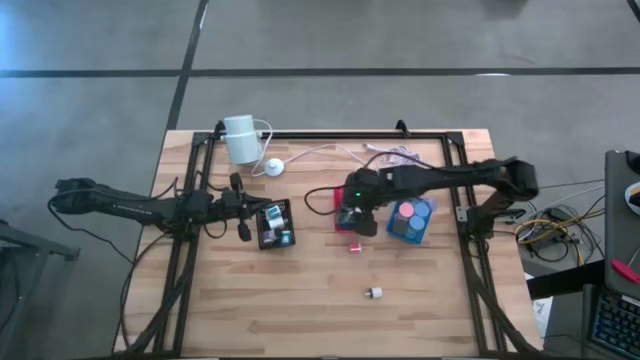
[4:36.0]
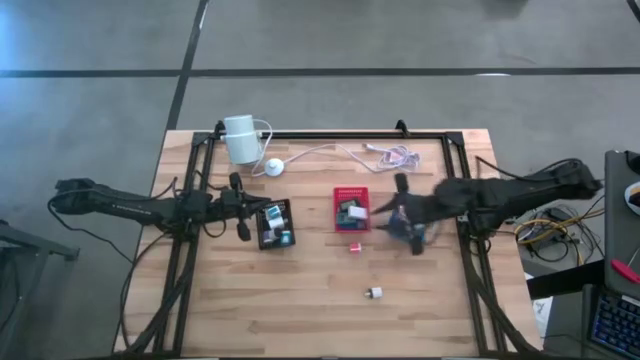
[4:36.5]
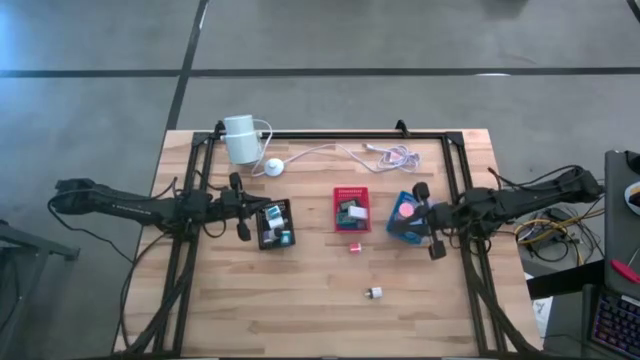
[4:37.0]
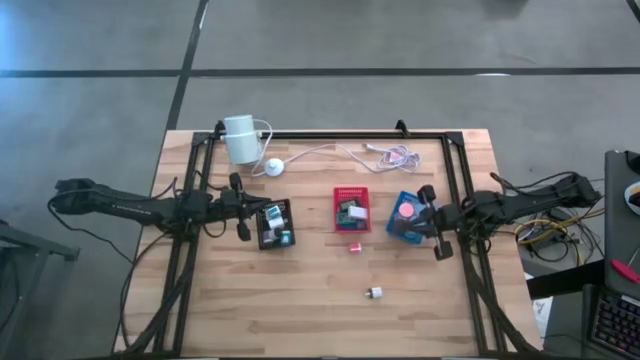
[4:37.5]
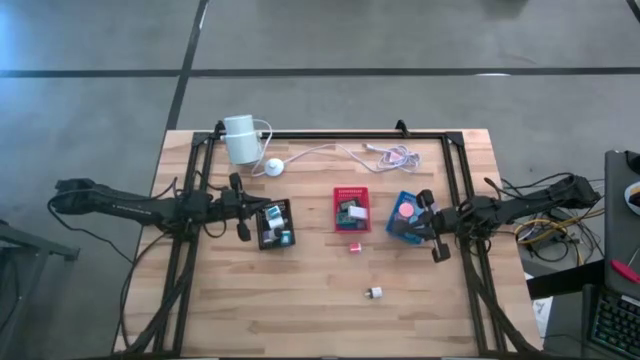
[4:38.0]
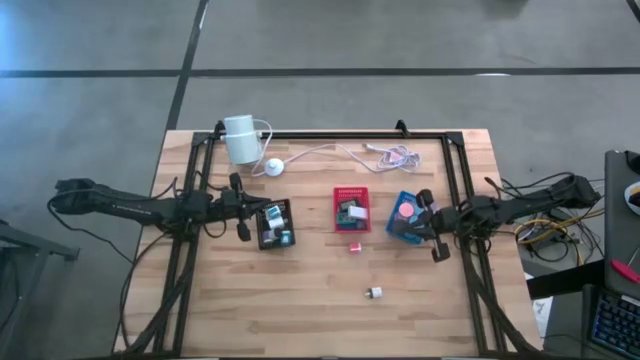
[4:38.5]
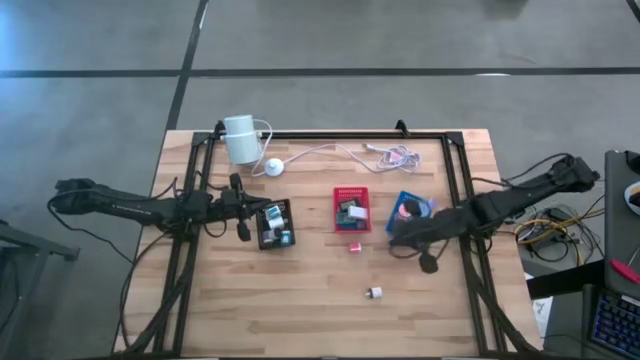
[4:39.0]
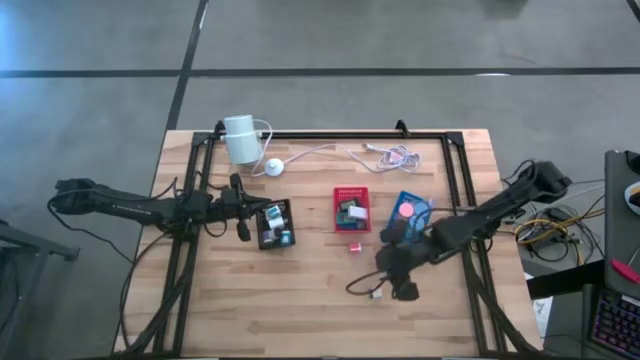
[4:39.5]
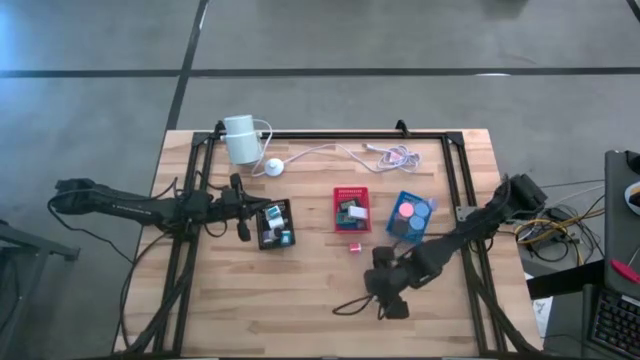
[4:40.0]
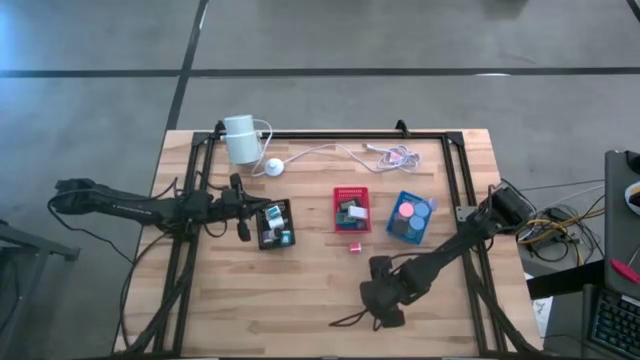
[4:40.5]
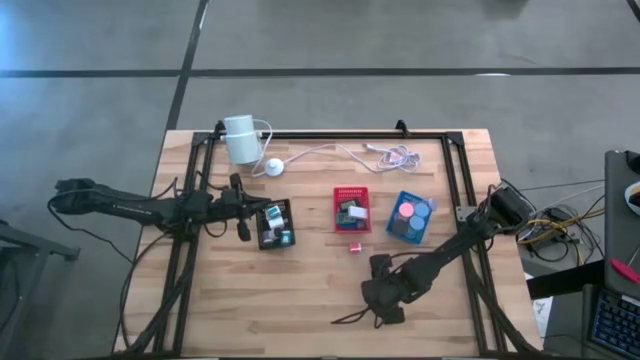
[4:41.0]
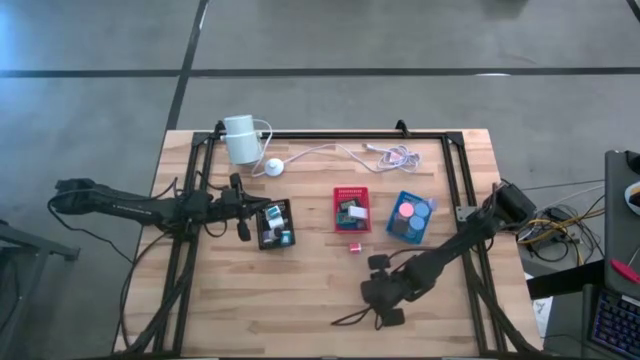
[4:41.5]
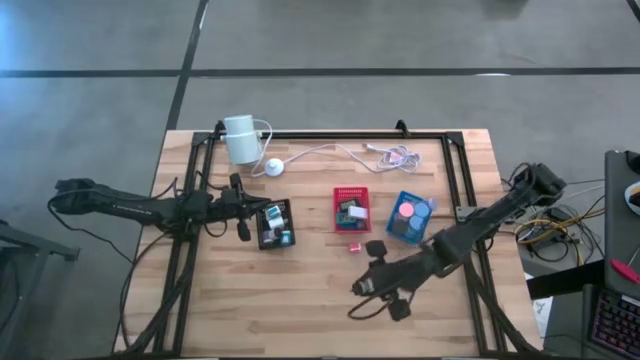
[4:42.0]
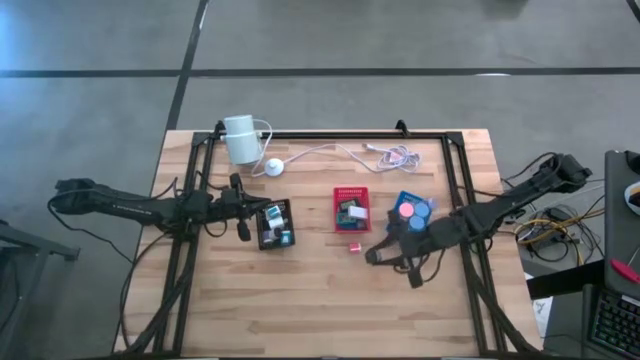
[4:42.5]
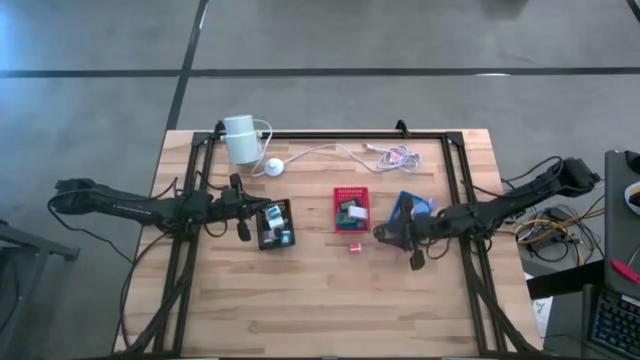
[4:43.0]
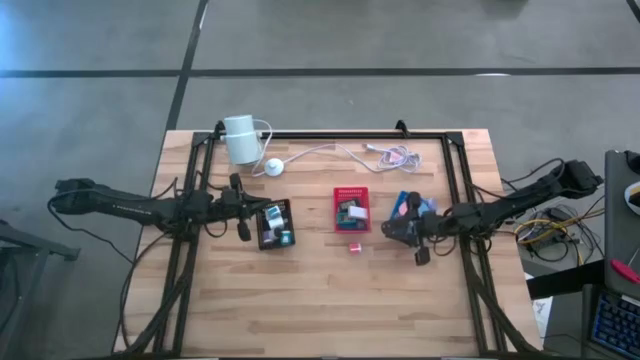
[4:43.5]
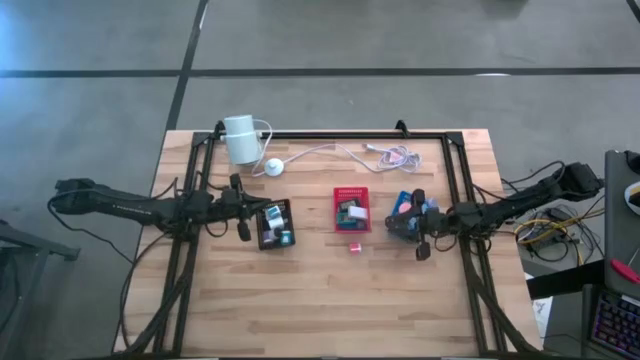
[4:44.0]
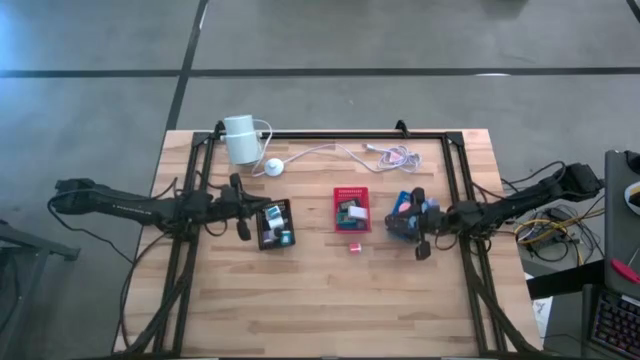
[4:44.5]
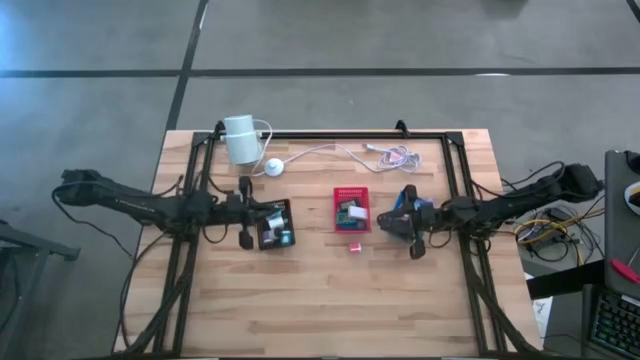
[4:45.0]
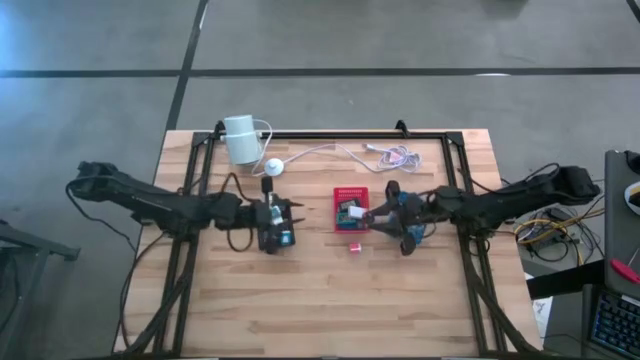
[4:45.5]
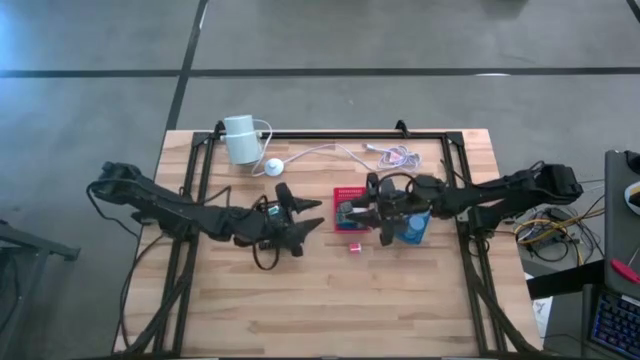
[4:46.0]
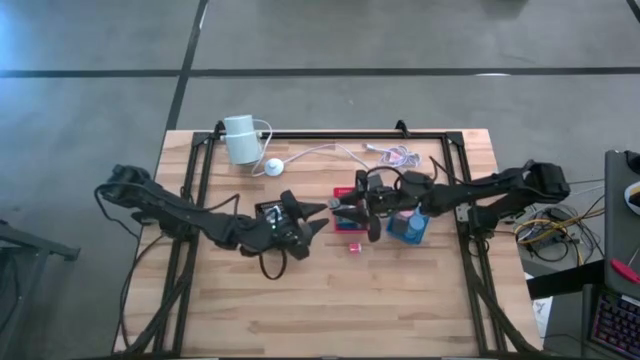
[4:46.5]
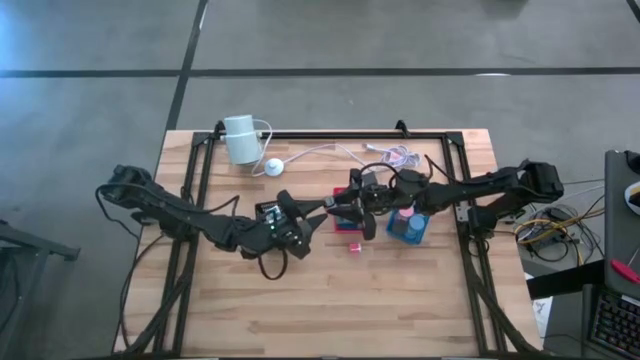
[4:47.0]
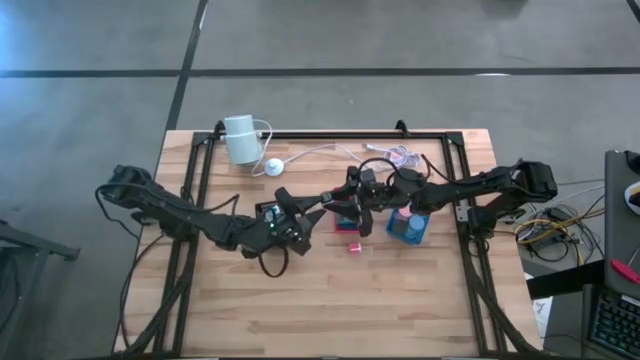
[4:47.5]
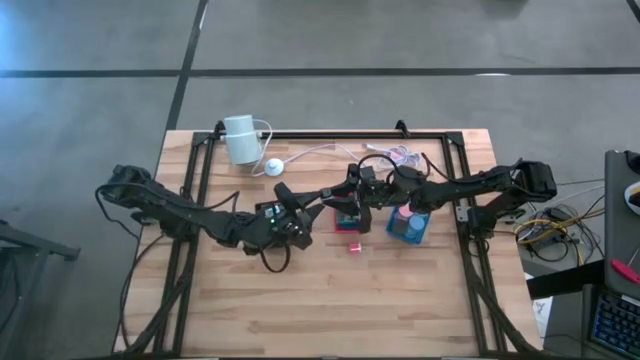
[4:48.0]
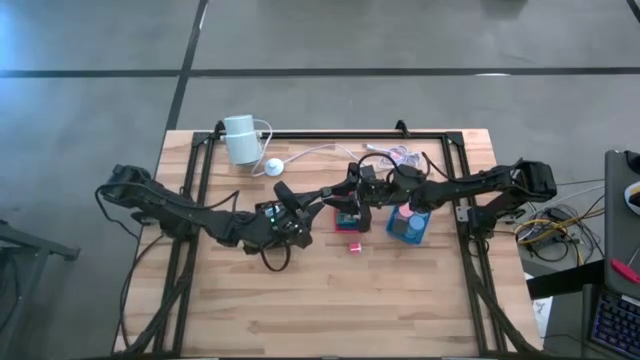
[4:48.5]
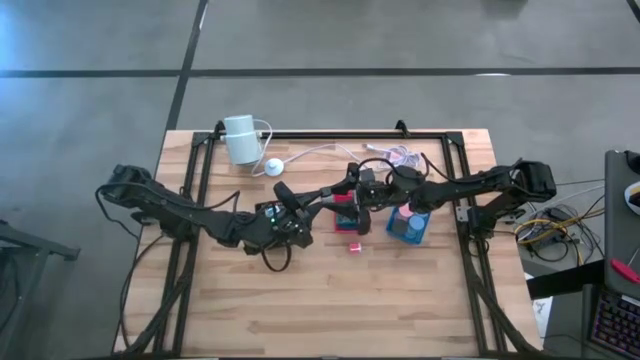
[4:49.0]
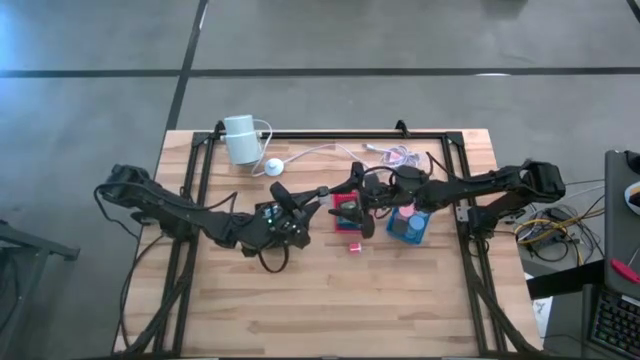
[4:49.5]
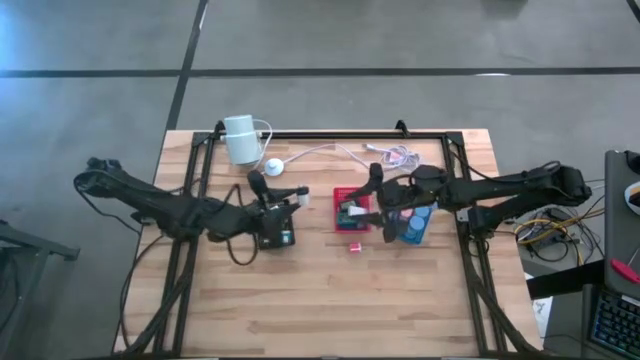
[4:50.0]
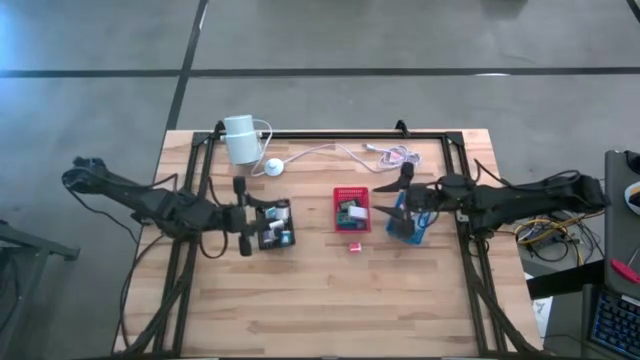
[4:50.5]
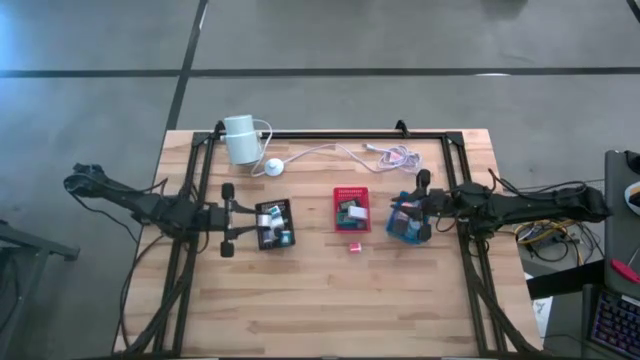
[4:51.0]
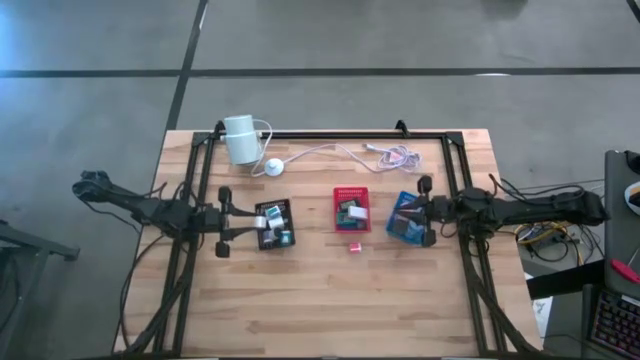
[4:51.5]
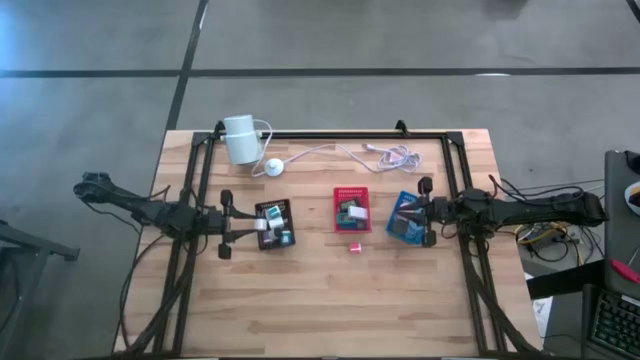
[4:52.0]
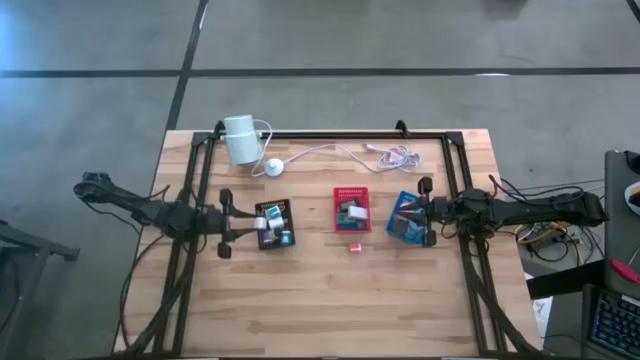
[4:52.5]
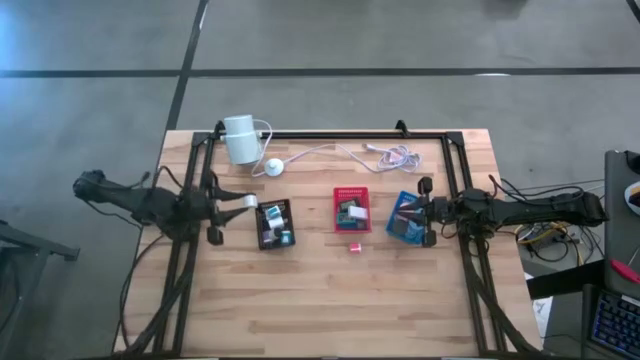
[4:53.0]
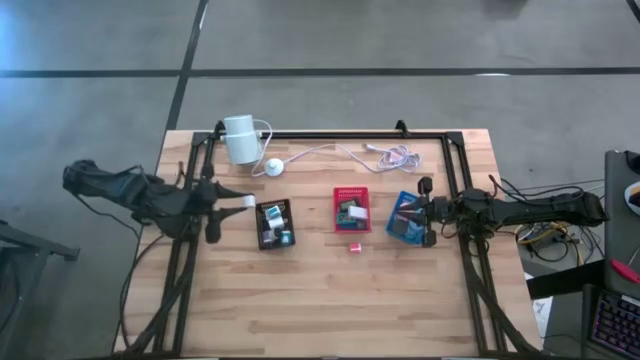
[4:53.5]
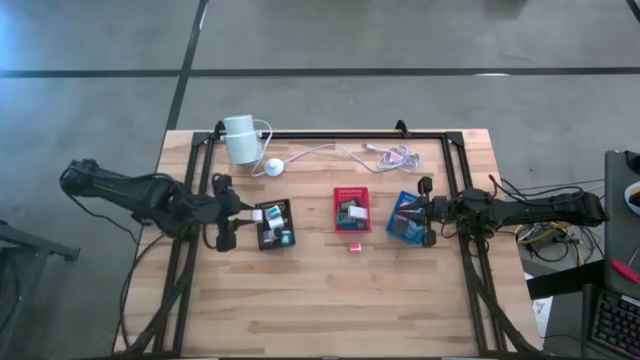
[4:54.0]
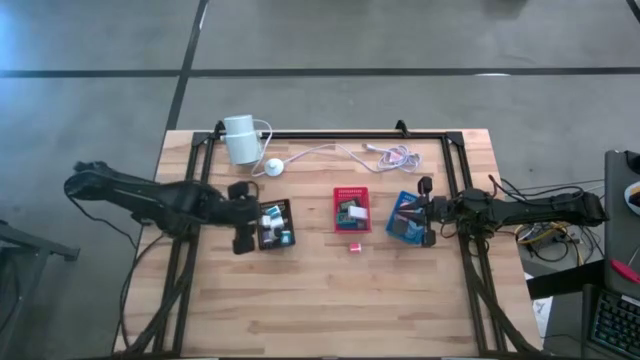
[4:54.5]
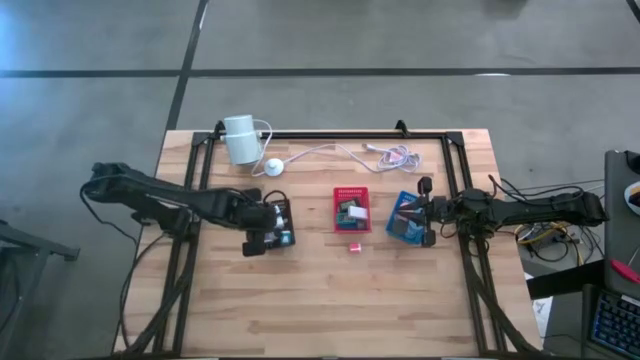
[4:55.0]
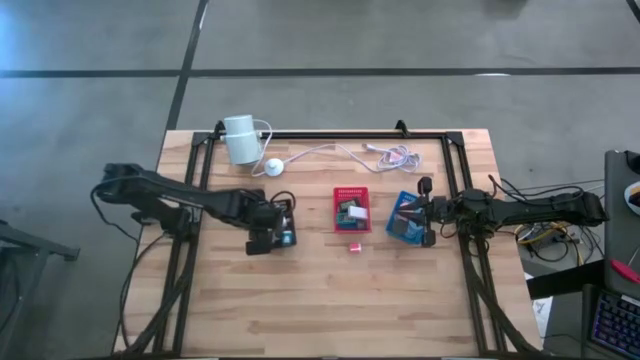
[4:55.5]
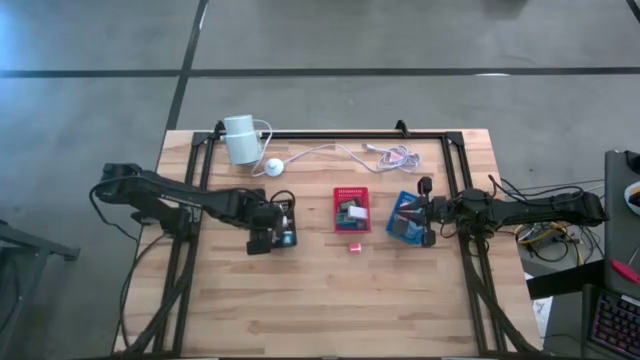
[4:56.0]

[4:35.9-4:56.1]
Task: Pick & Place Office items
Put the black white charger adapter into the black bin
